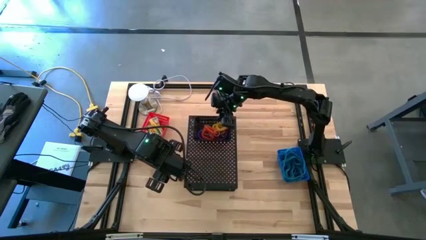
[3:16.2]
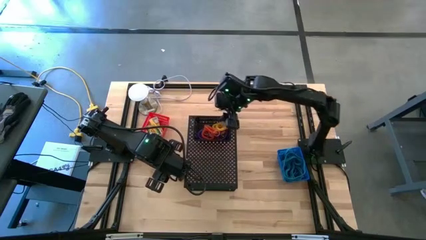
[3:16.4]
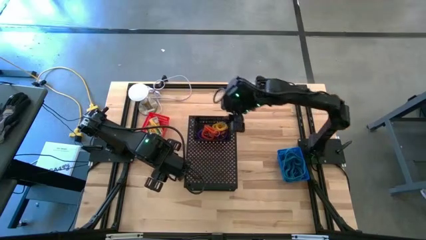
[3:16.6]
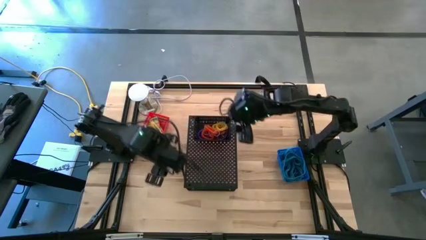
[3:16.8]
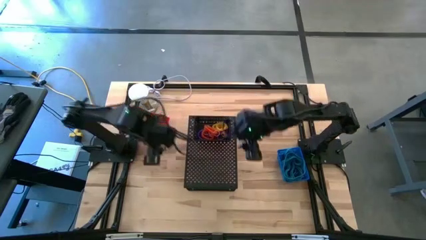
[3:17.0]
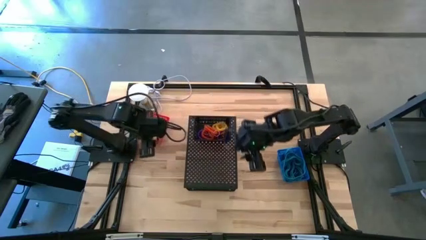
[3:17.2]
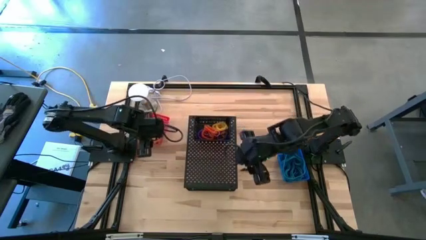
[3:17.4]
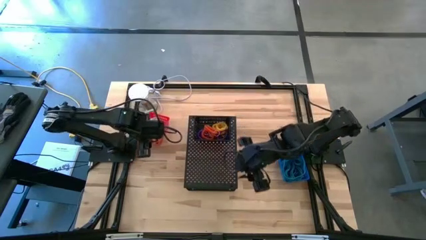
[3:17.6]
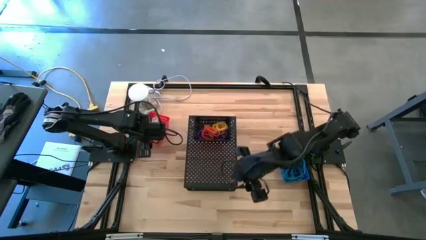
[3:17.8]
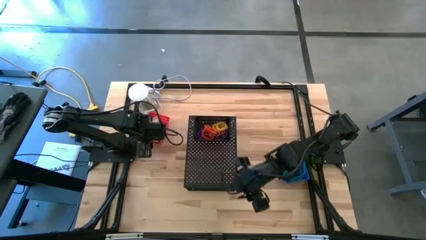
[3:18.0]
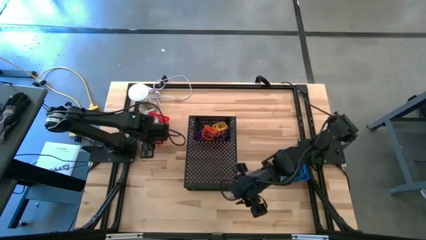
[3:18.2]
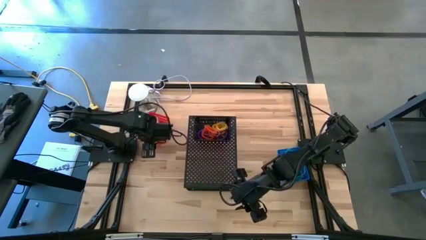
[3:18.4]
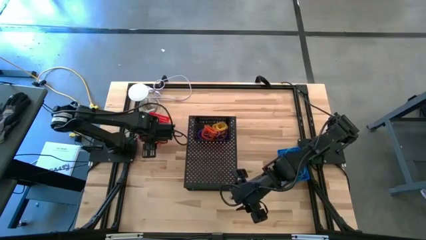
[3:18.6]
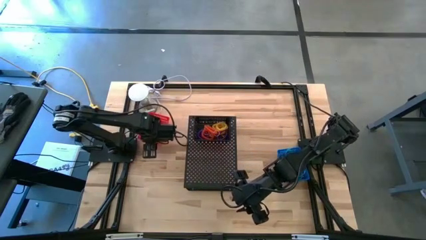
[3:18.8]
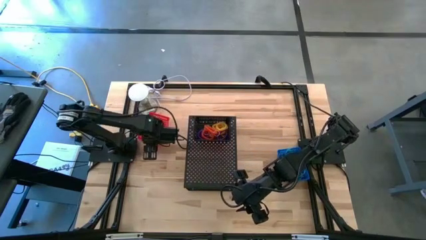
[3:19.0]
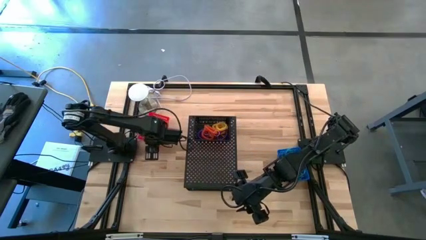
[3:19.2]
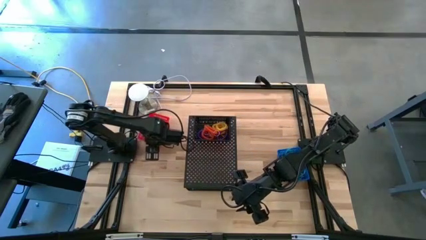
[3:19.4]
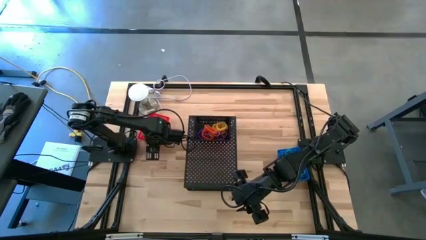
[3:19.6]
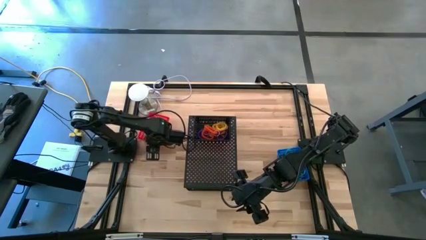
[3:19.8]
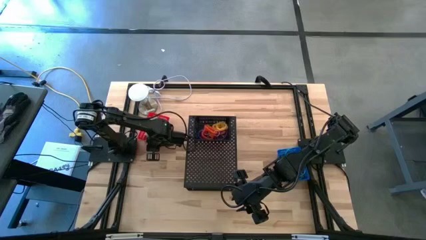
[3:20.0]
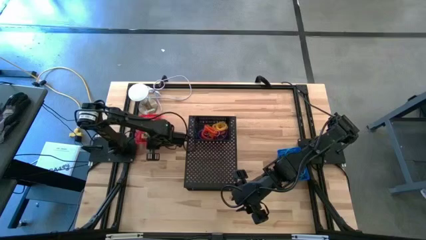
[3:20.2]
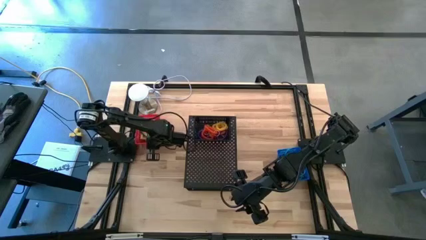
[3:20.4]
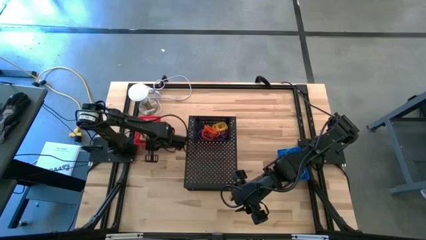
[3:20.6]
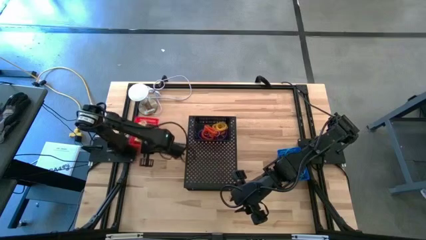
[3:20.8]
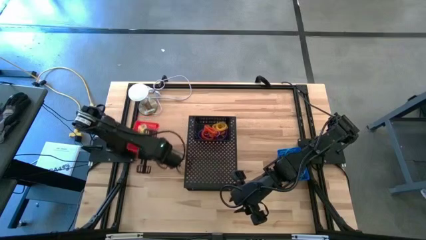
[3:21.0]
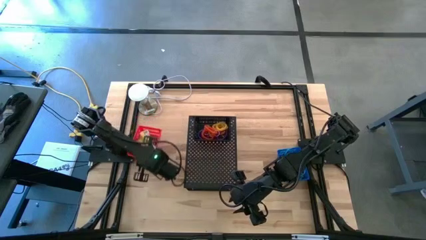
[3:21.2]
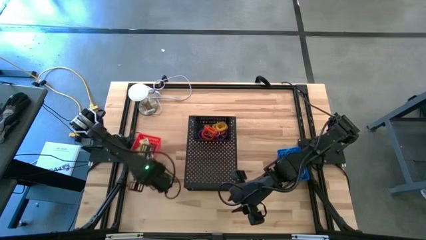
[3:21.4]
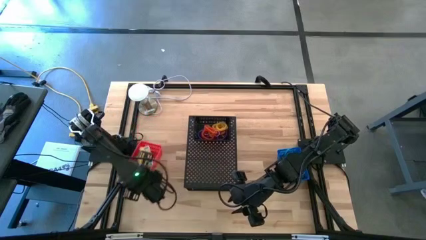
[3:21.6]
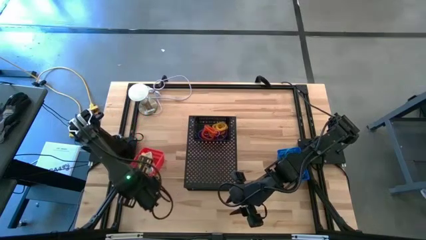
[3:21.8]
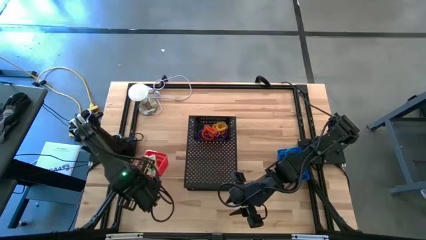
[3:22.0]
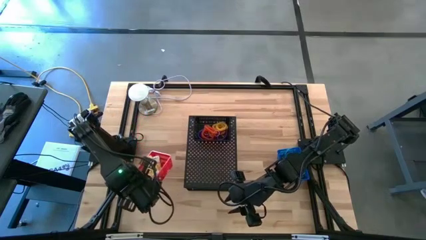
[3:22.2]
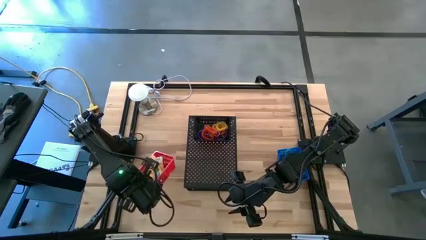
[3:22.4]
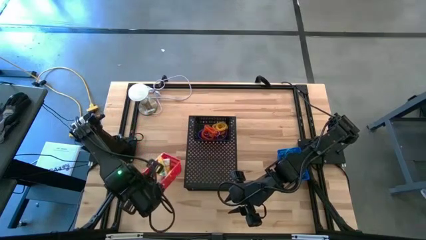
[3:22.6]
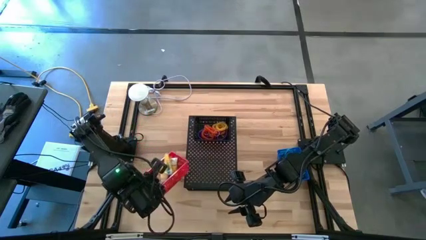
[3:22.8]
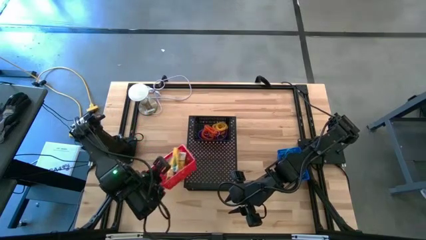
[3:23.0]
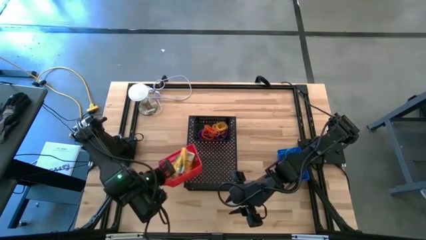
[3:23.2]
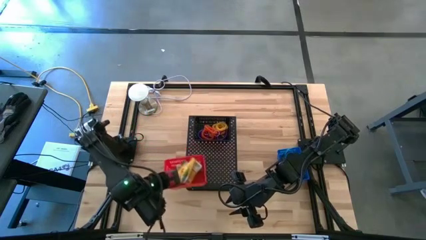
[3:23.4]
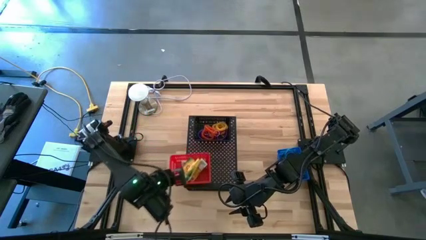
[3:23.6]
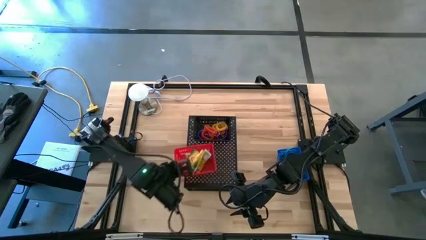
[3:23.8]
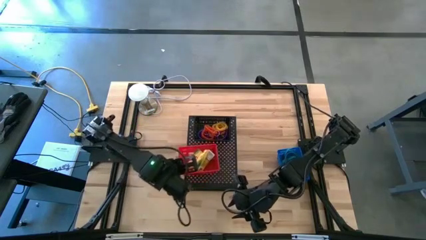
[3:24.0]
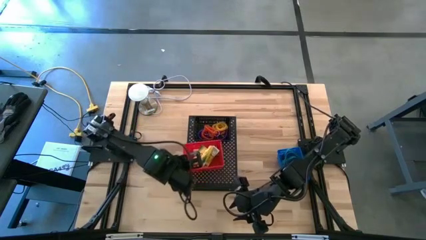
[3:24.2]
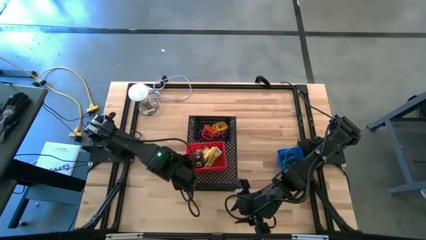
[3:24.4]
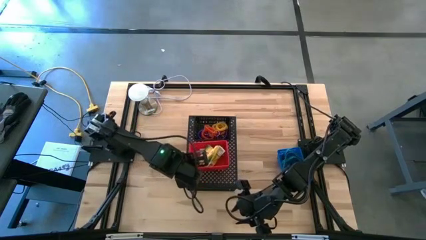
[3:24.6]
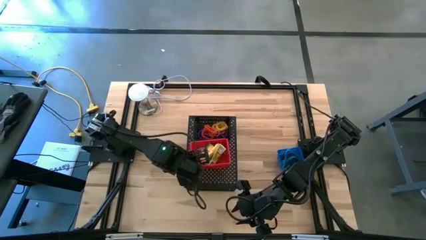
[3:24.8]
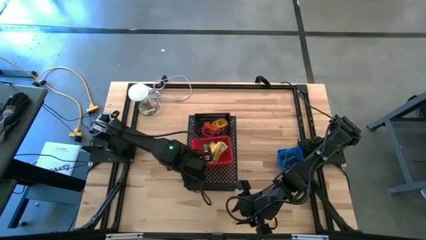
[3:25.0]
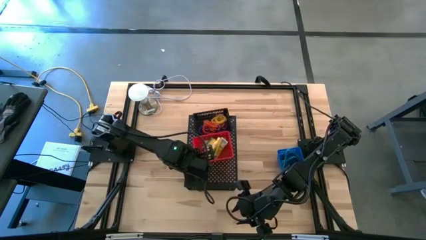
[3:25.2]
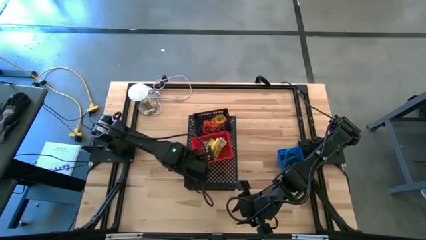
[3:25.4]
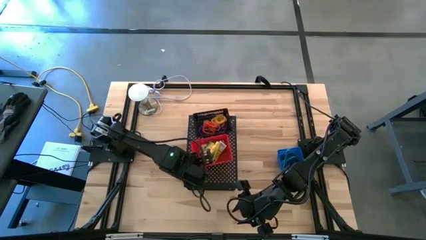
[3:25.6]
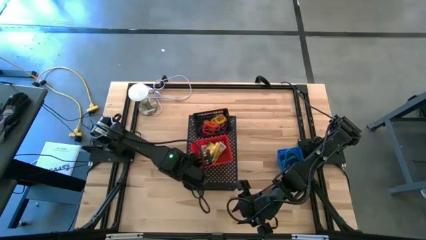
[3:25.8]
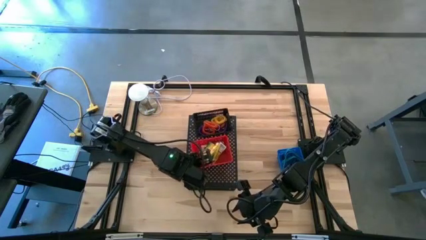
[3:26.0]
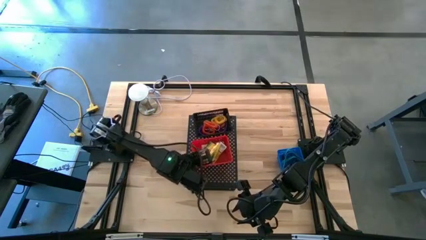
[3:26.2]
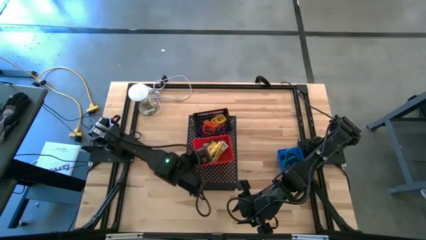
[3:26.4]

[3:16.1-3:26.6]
Task: Pick & Place Office Desk Supplies
Put the red bin on the shelf

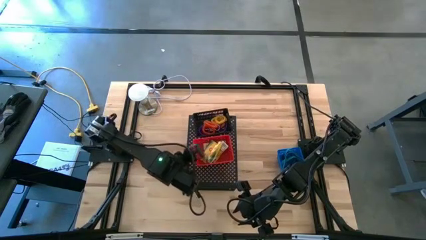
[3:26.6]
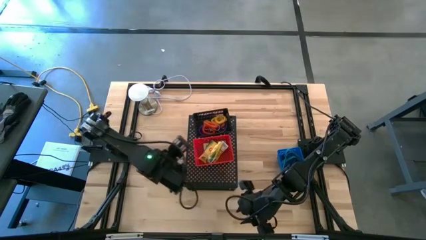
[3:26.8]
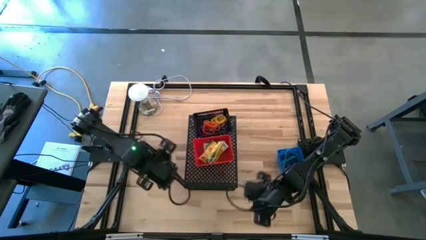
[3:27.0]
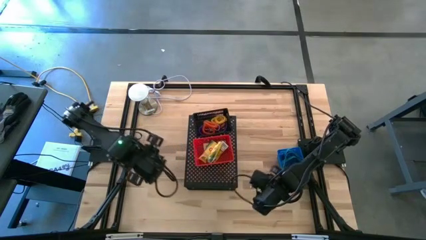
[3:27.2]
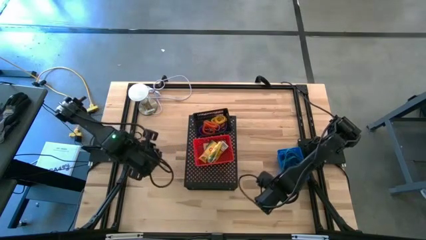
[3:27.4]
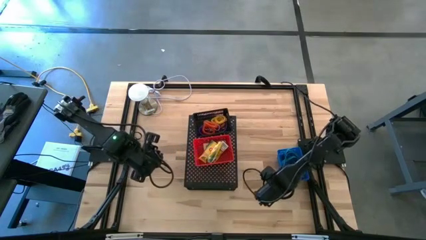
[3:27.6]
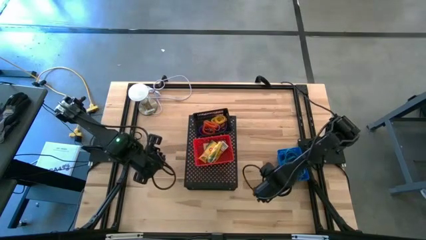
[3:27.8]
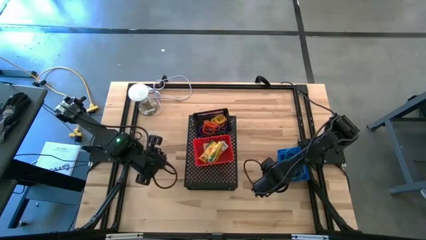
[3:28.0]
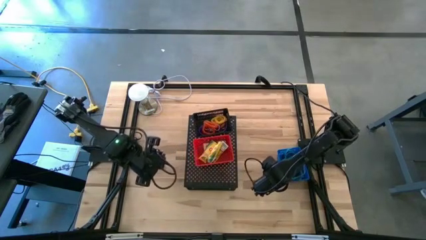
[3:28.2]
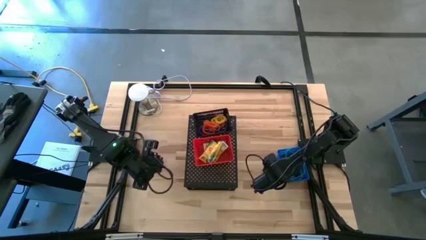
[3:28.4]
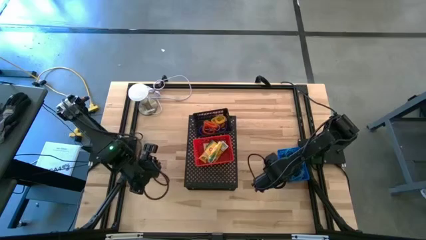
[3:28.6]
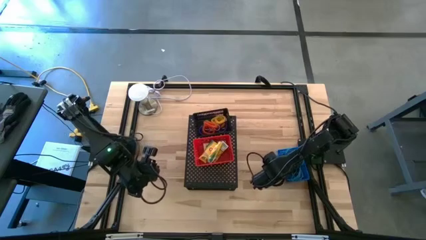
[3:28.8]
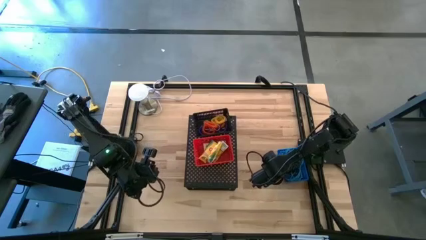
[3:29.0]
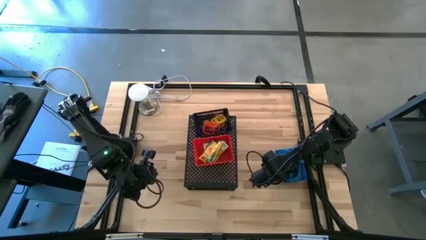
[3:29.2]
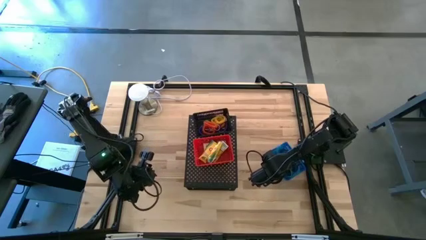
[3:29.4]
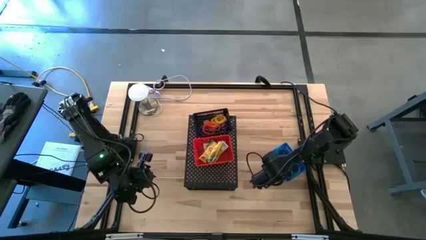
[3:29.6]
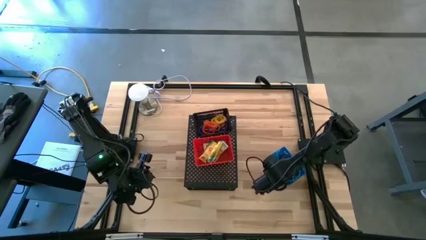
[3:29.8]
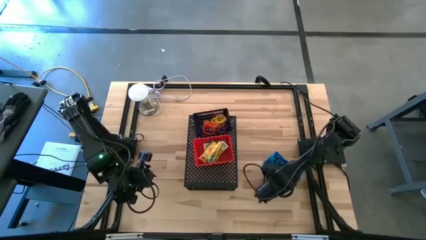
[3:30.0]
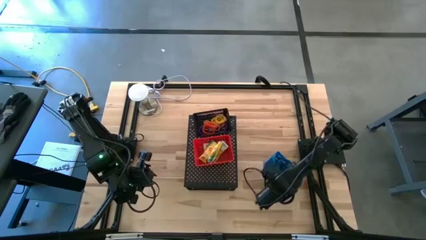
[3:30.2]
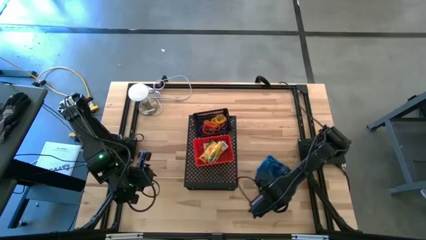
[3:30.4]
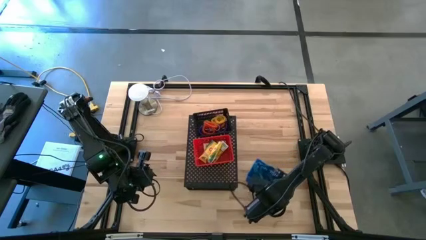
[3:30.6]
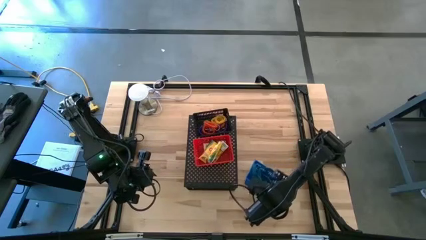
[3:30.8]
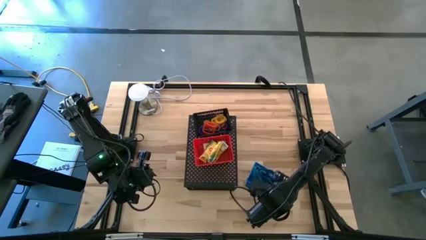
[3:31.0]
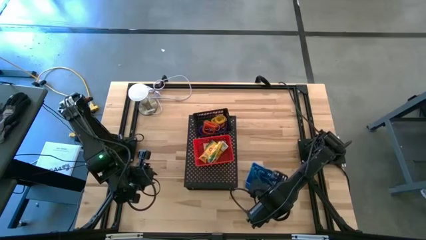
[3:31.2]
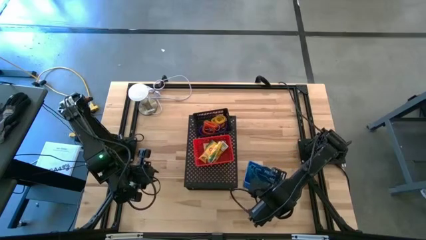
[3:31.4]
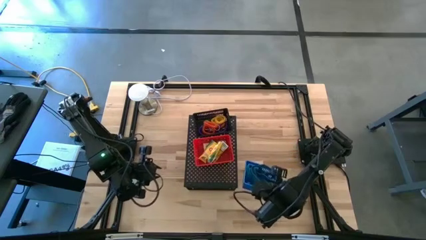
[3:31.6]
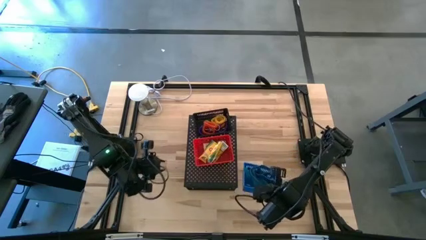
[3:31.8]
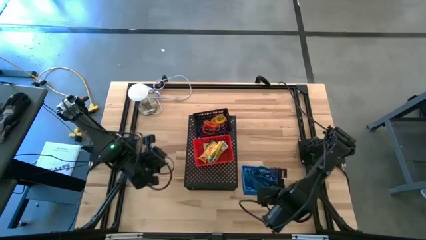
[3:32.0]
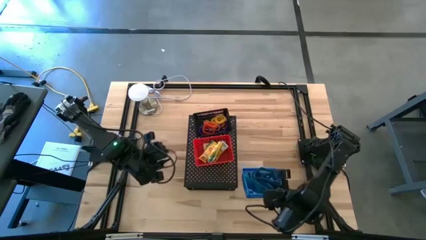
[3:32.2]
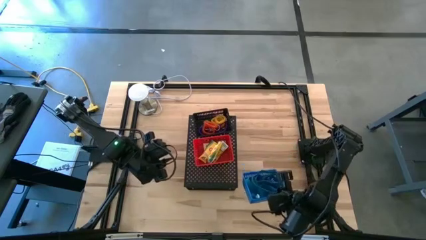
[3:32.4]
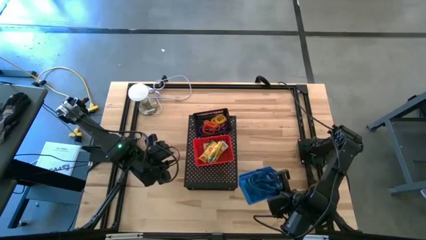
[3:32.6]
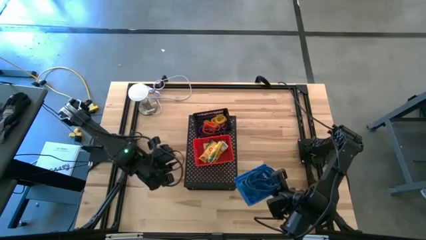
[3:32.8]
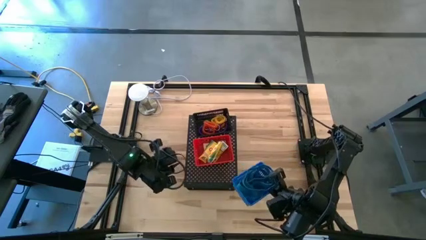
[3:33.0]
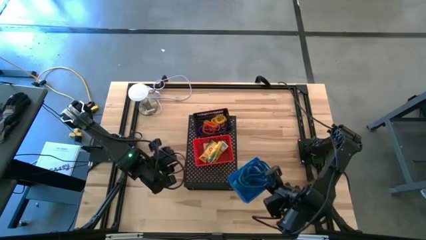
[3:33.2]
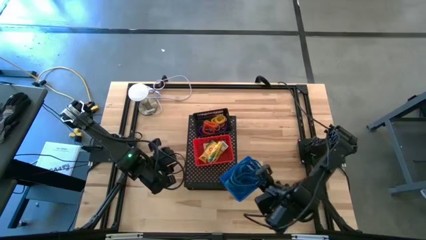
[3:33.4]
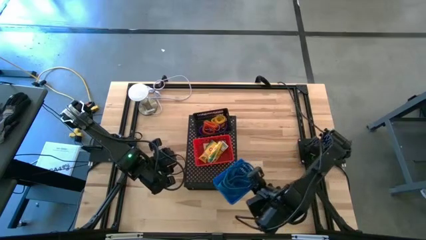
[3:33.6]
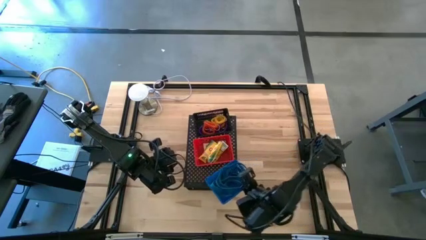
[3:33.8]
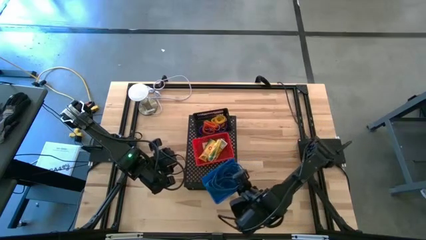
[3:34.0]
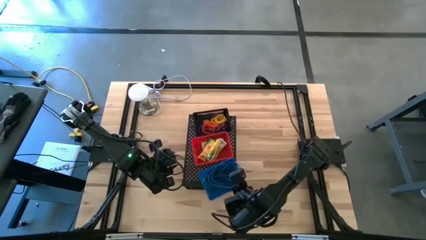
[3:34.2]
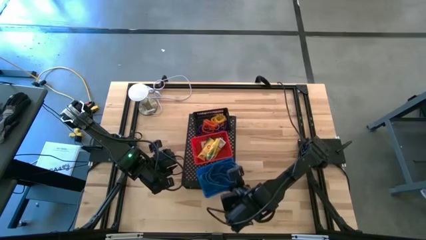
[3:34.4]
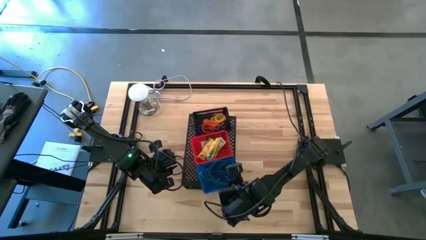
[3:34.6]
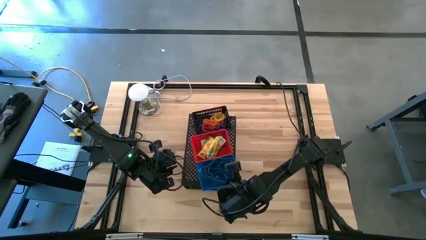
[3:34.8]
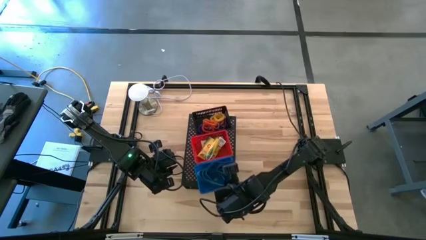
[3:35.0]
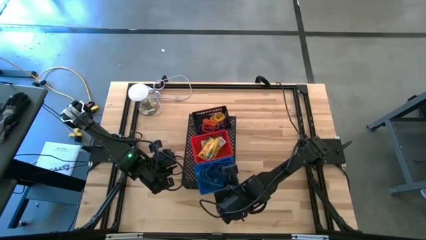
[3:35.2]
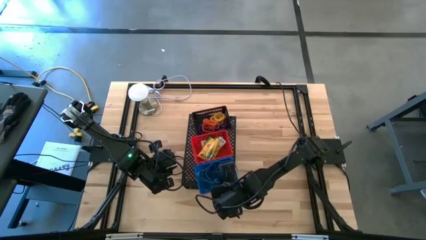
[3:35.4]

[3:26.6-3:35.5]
Put the blue bin on the shelf
